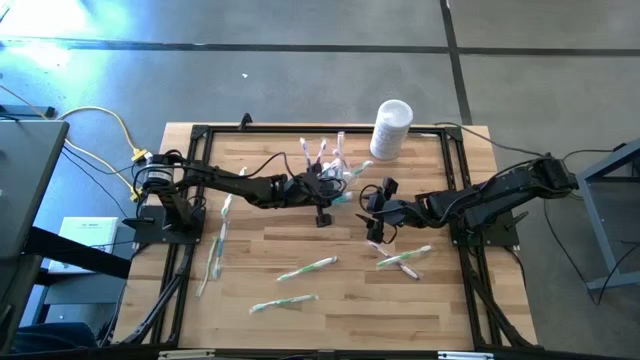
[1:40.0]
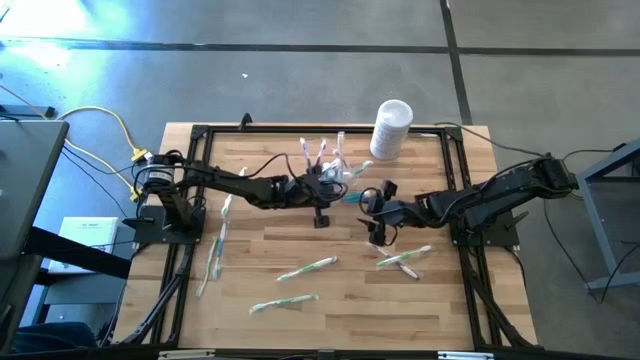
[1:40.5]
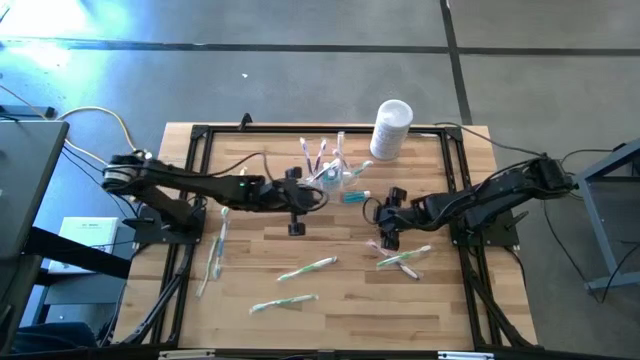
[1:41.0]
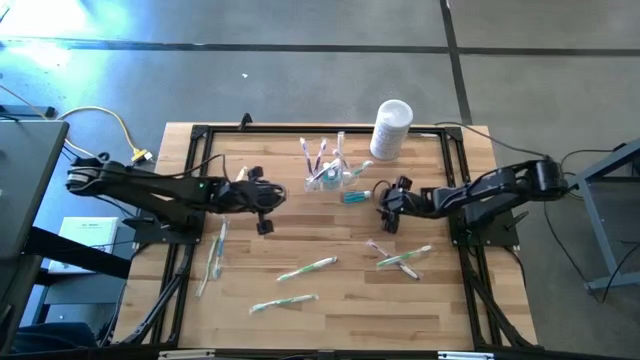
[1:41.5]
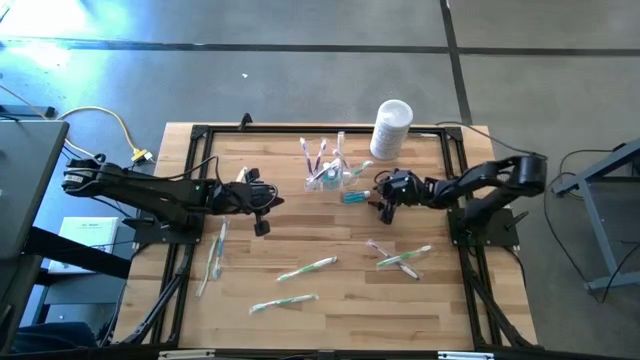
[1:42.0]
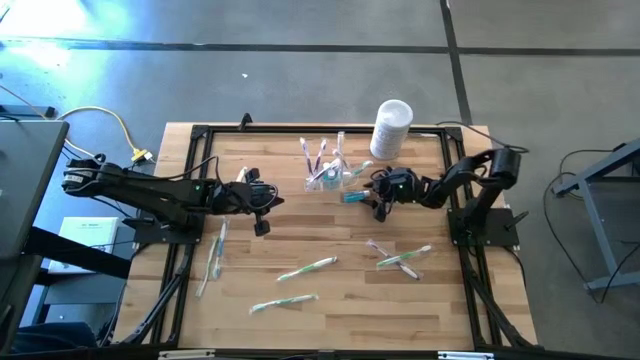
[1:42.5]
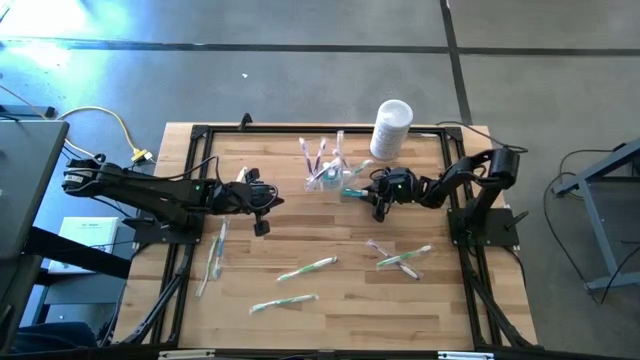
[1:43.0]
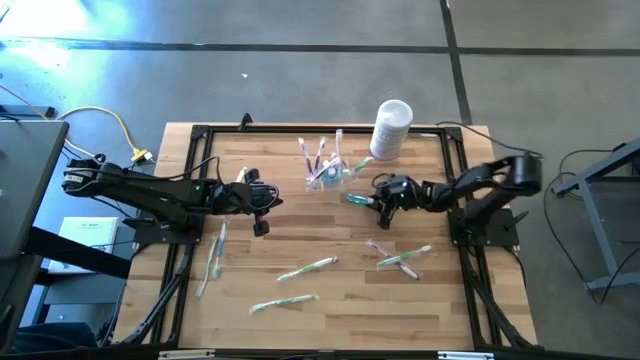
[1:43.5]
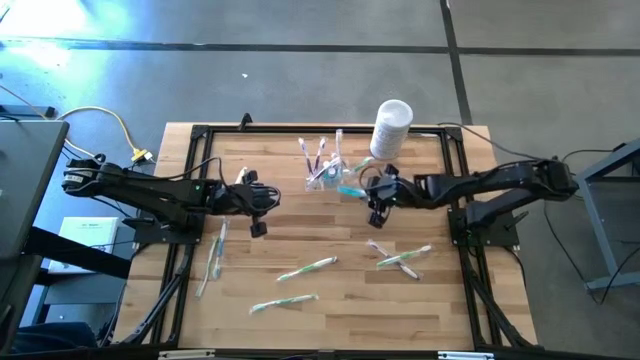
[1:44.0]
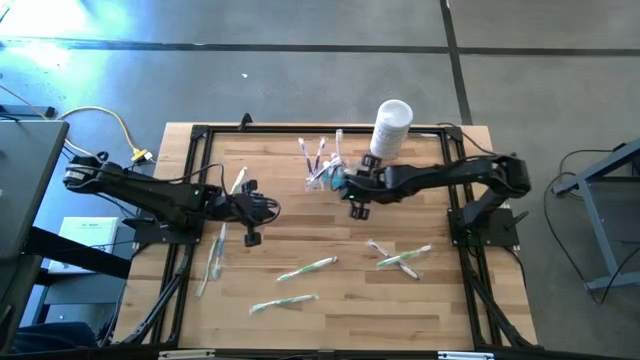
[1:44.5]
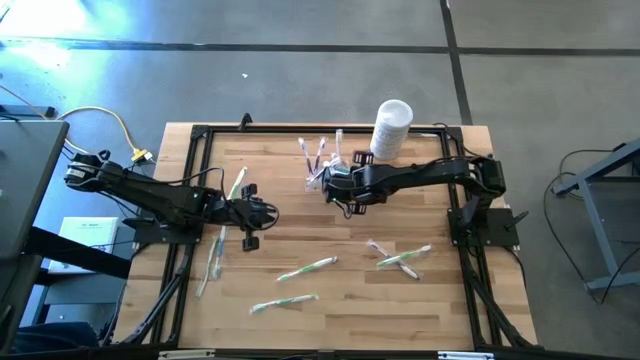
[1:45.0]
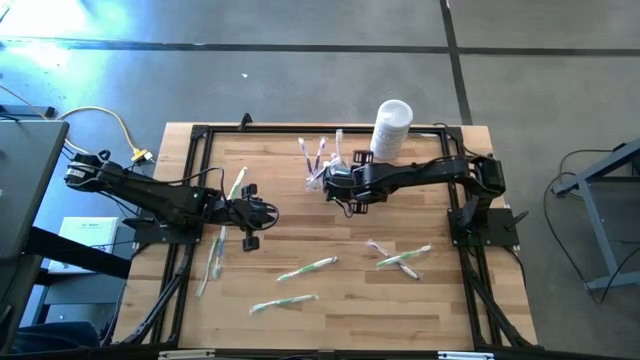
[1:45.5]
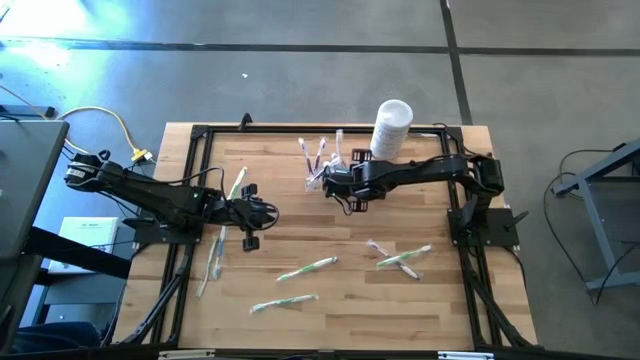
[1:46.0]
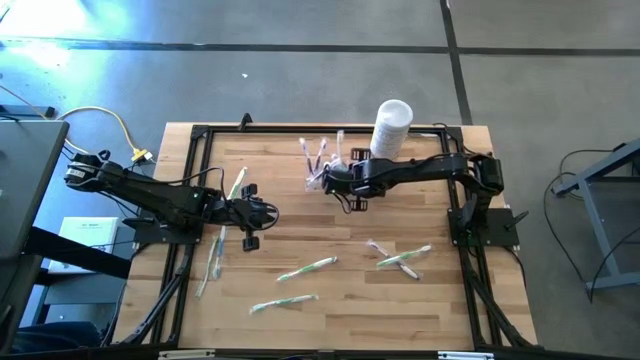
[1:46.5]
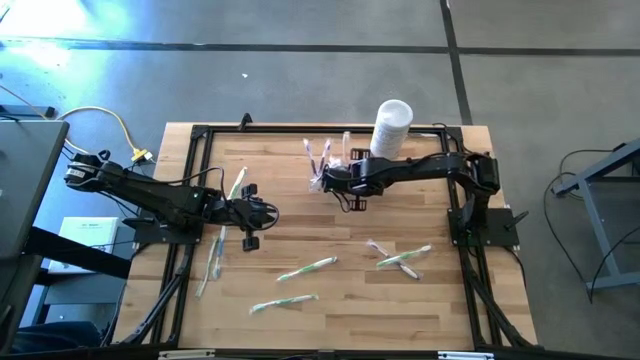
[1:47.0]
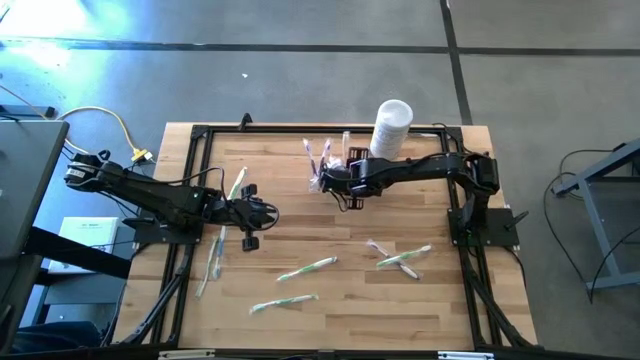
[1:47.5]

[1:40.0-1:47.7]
Task: Pick & Place toothbrushing station
Put the blue mouthwash into the transparent organizer

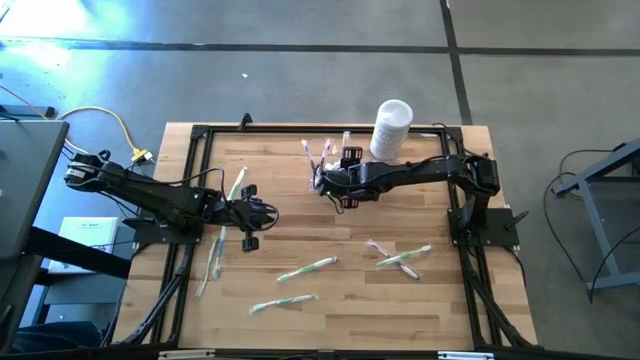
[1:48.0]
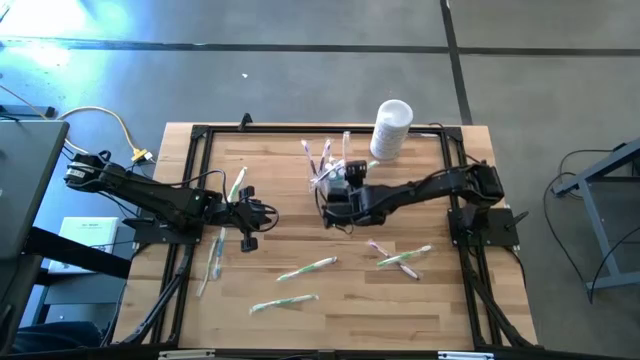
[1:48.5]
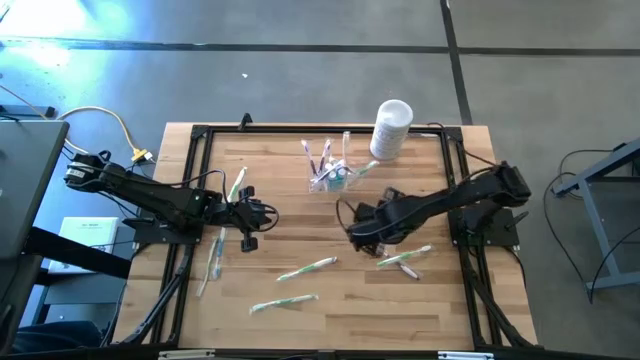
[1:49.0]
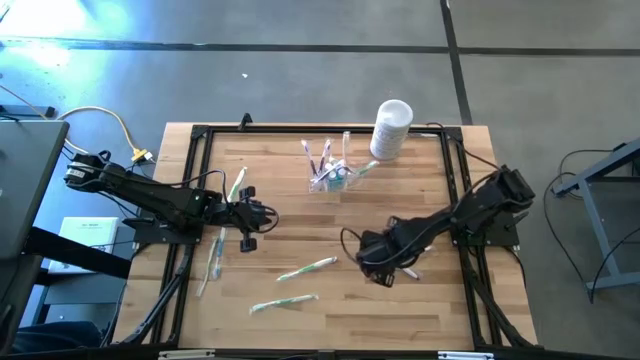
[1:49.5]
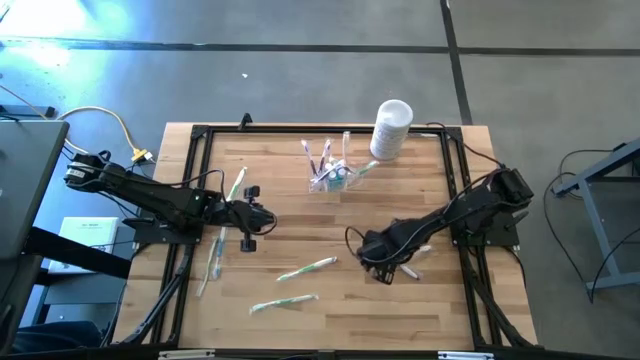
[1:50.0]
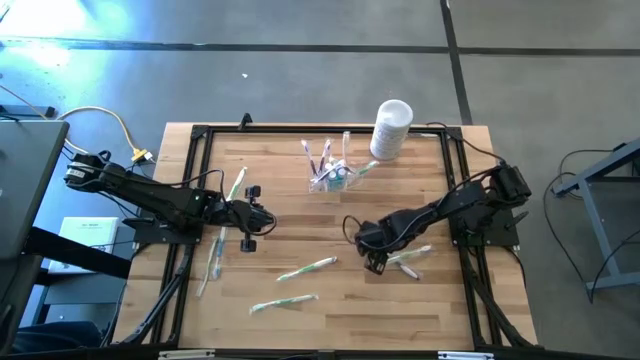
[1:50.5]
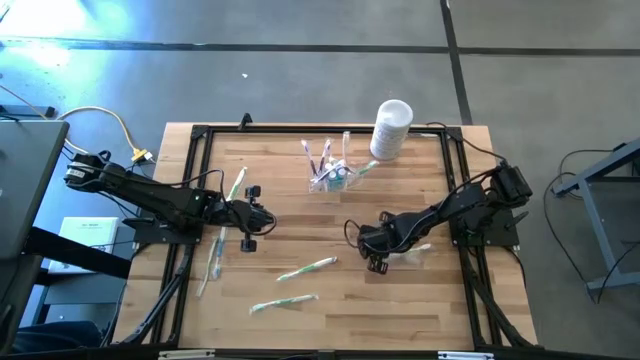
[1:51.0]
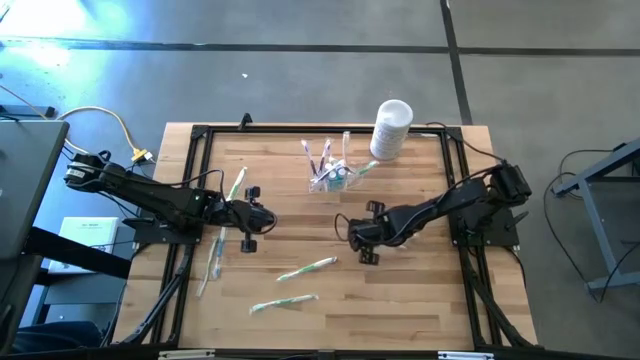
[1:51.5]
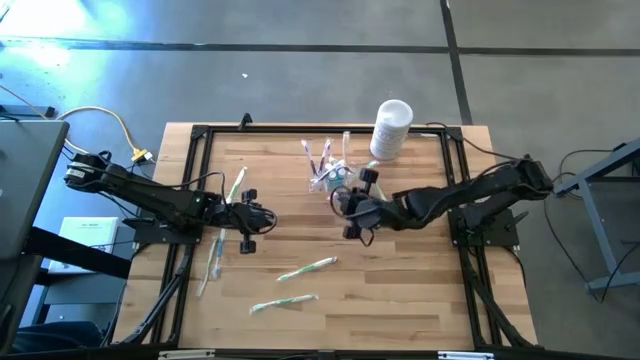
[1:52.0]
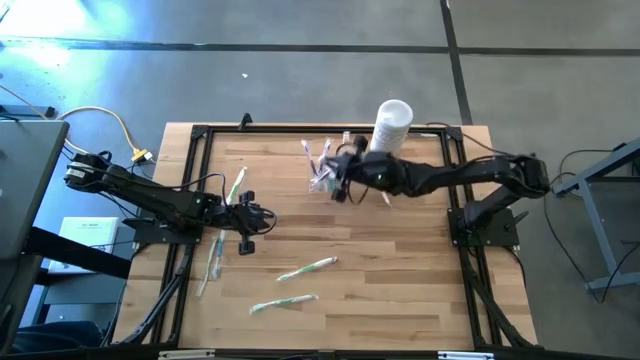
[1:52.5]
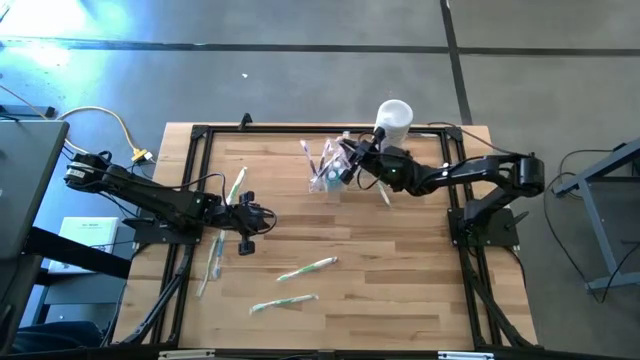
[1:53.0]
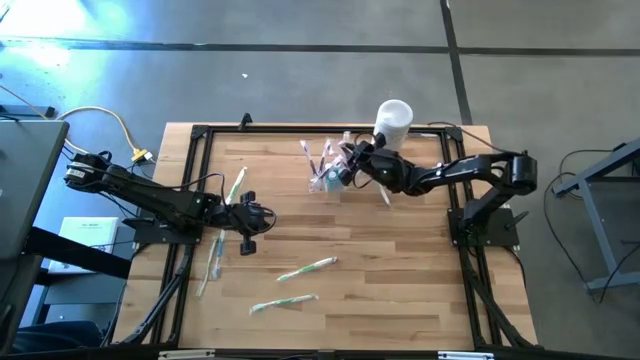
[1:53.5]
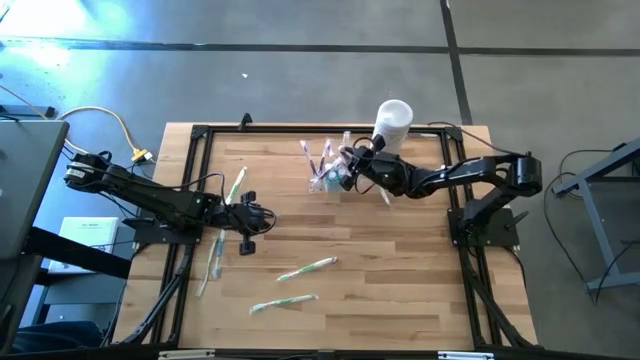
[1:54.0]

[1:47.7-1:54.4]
Put the purple toothbrush into the transparent organizer

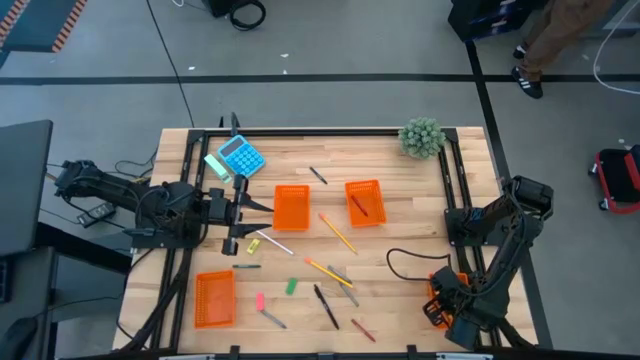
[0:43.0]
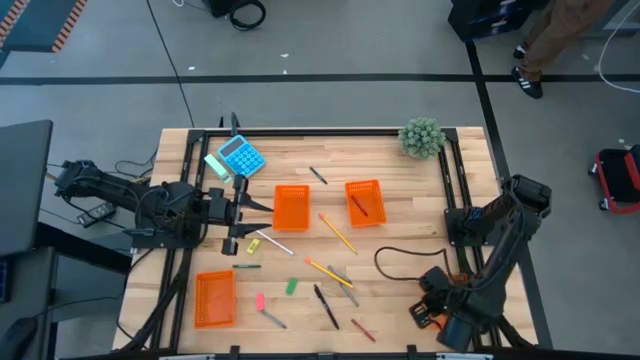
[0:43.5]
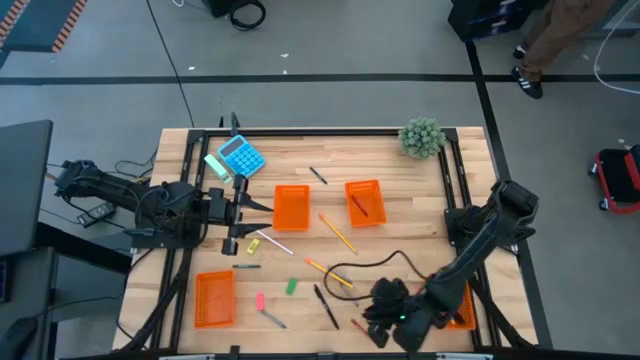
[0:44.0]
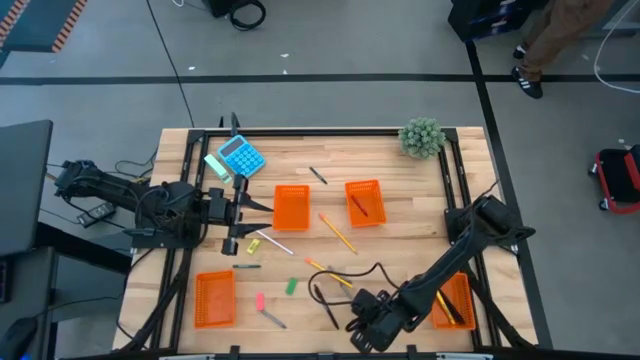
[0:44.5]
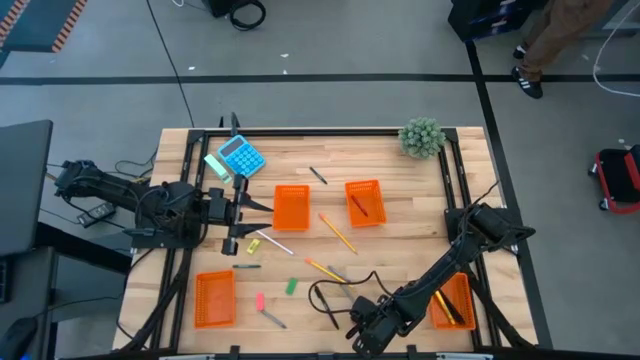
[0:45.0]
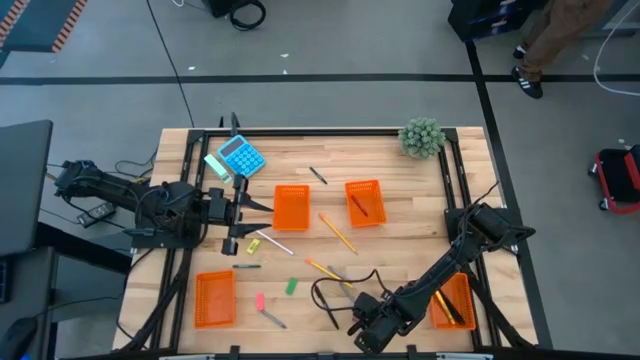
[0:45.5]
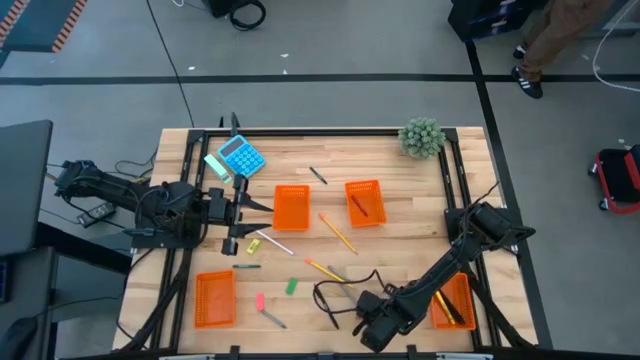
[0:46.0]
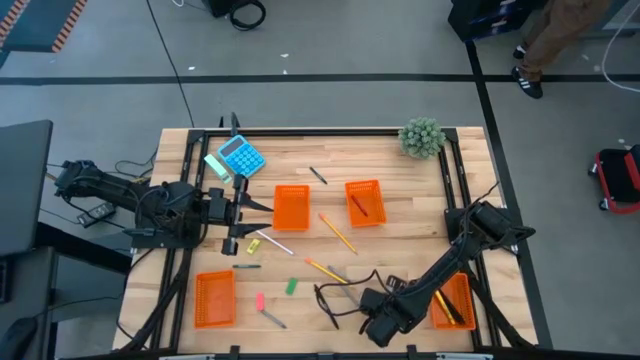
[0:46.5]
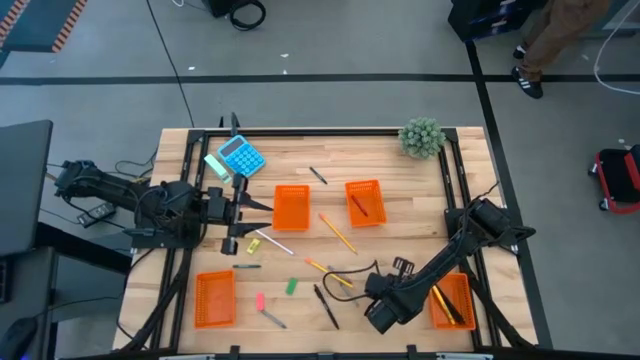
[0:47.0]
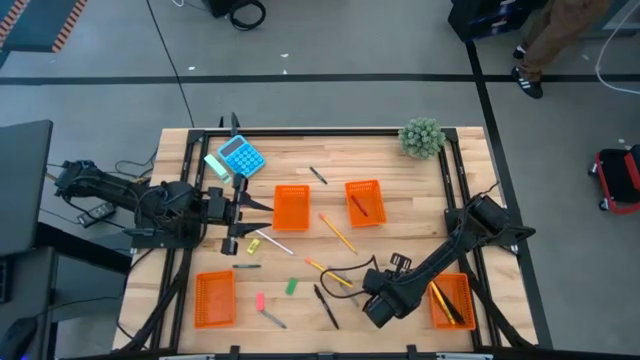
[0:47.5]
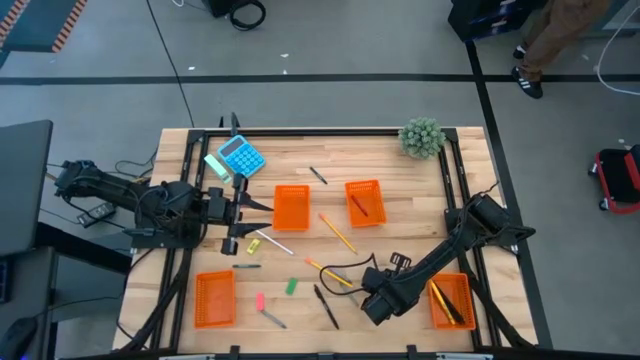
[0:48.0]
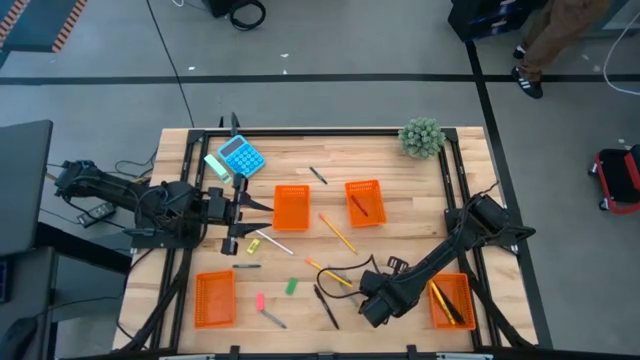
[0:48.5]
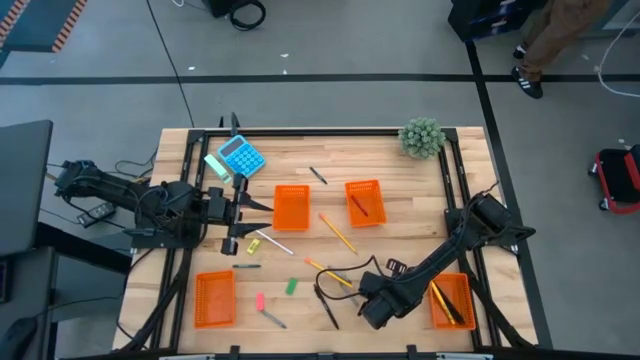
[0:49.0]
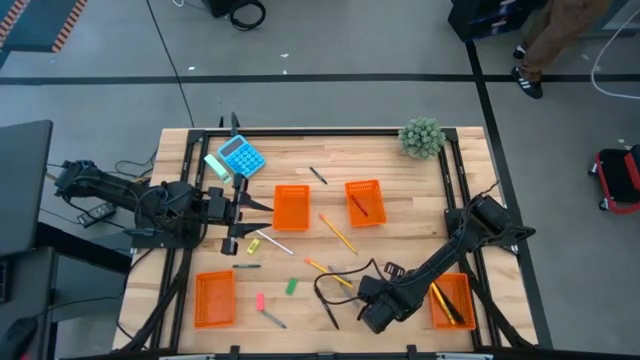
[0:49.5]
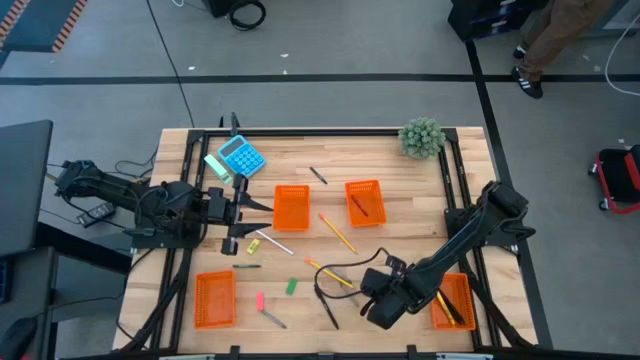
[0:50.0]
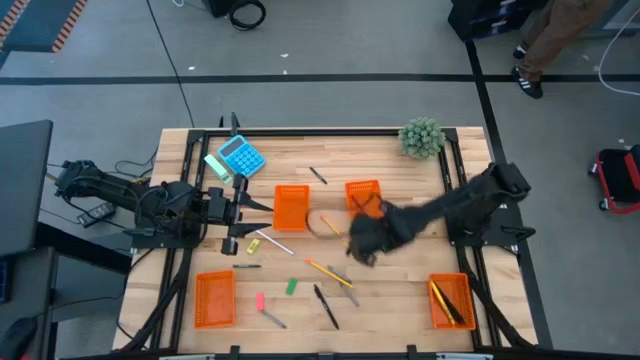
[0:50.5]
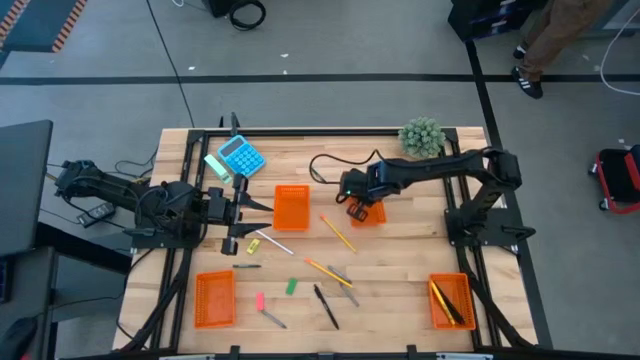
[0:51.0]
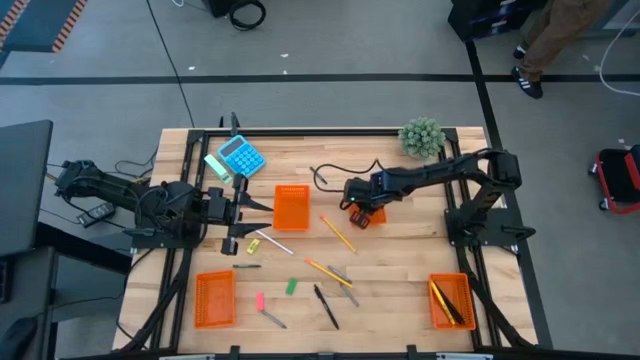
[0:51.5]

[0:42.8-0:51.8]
Task: Sort crayons/erasers/pens/pencils in bins
Put the red crayon into the top right orange bin
